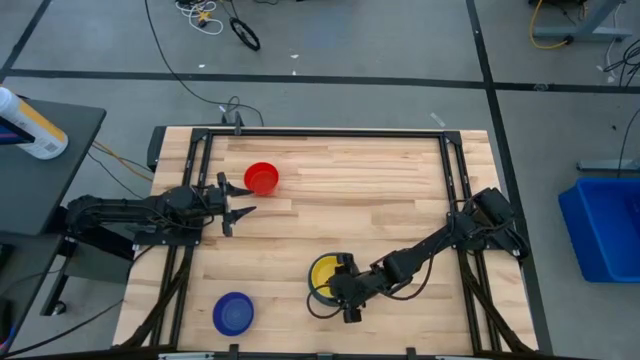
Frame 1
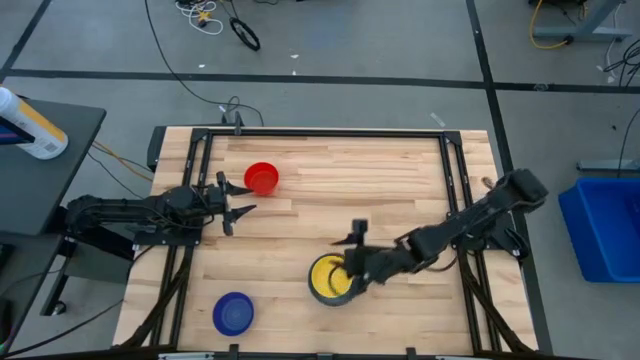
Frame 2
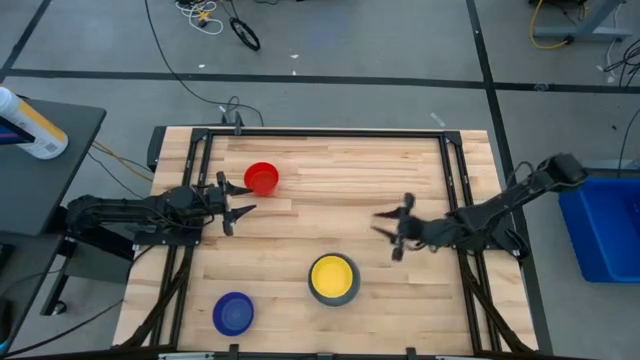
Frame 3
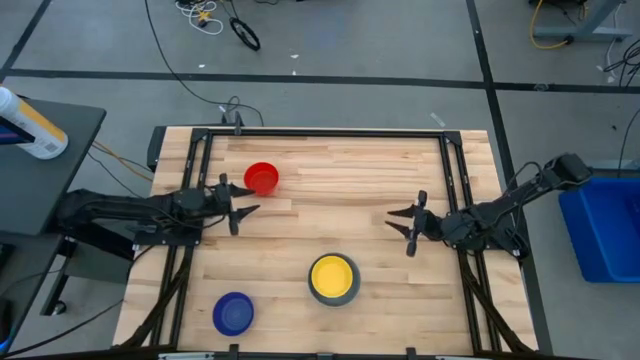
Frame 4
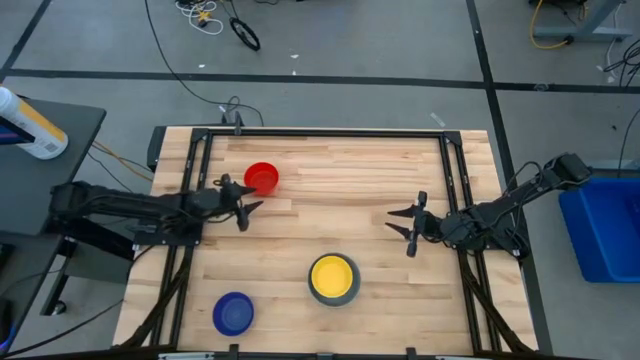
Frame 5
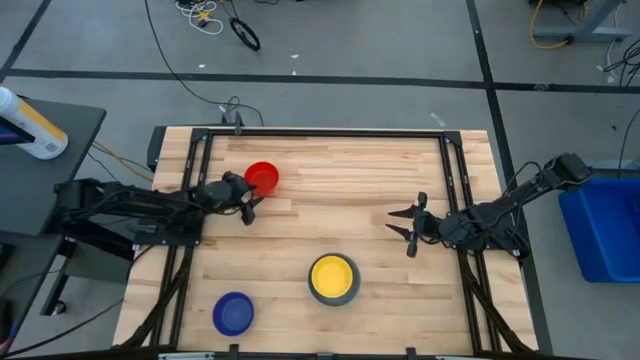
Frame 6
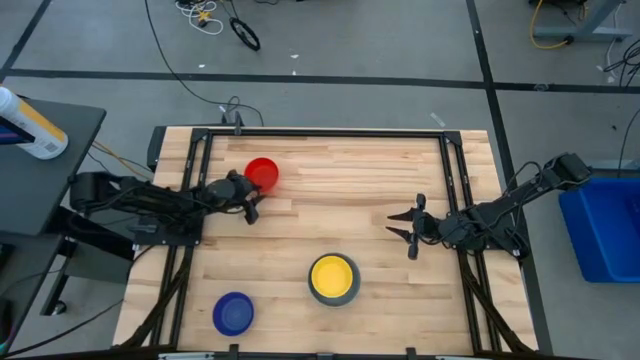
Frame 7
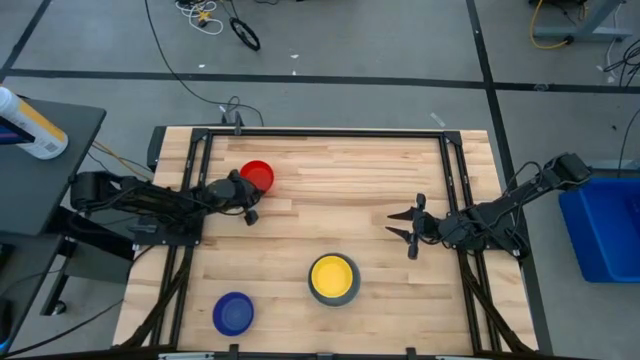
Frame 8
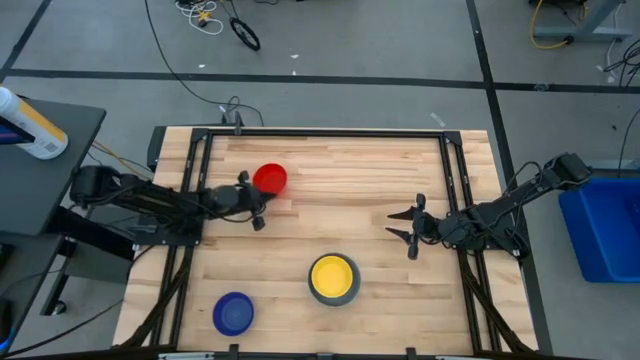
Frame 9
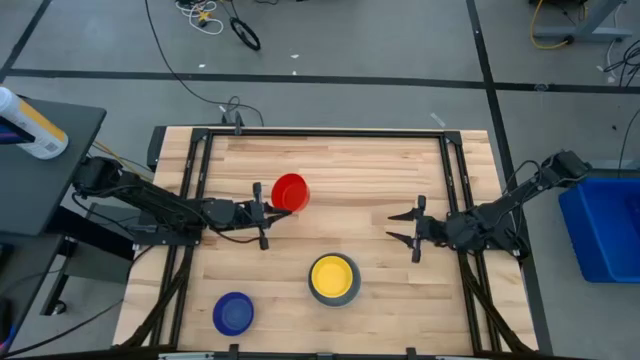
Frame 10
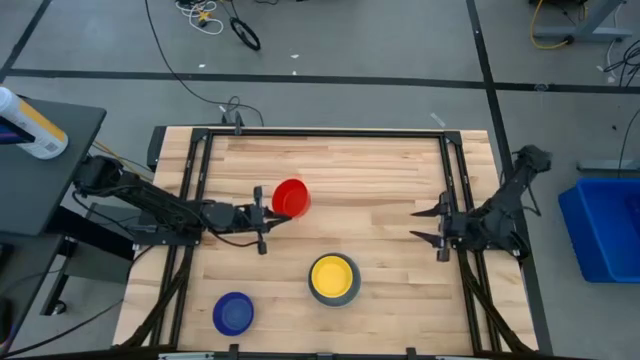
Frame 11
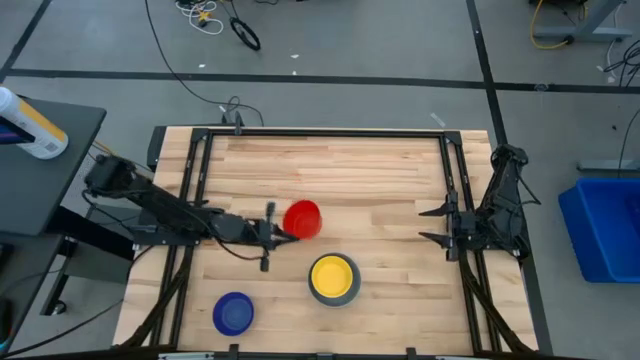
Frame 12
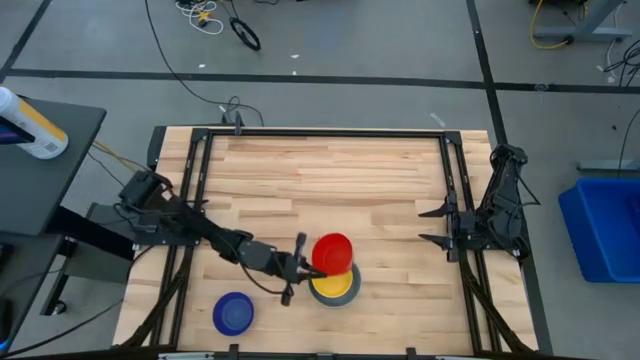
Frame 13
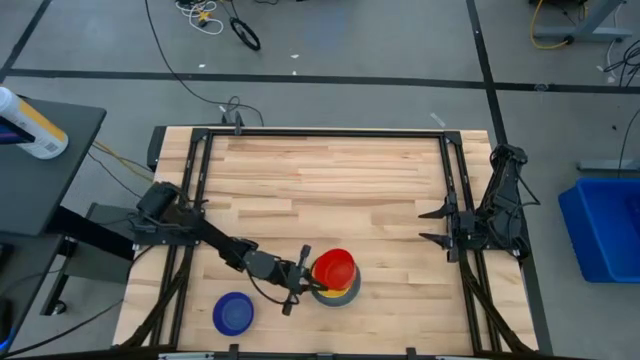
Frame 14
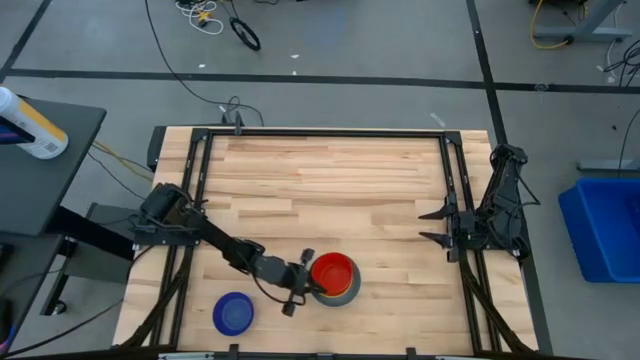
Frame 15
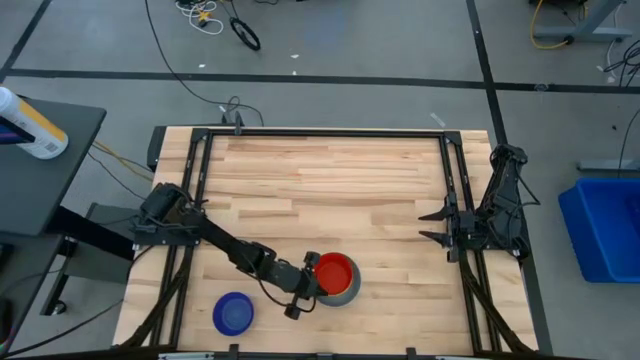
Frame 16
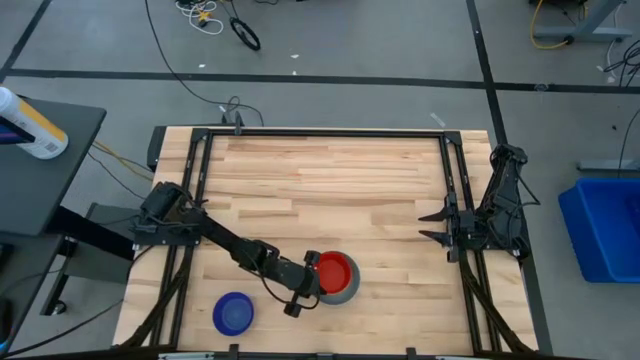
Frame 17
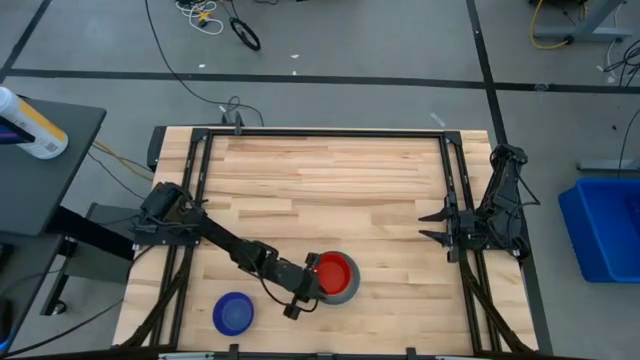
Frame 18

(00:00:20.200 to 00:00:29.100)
Stack the red bowl on top of the yellow bowl

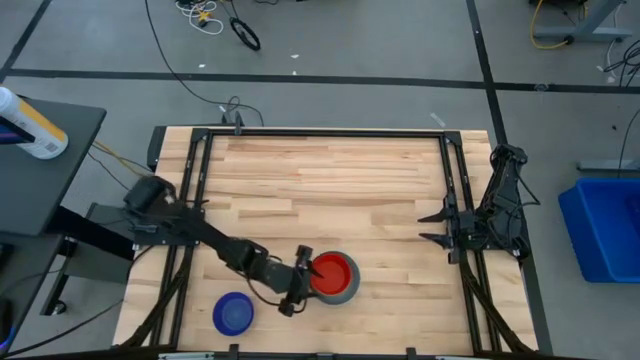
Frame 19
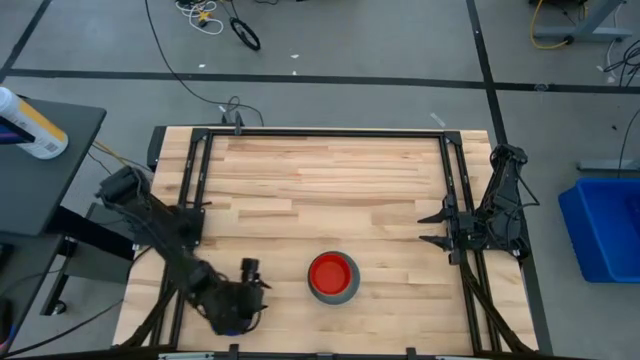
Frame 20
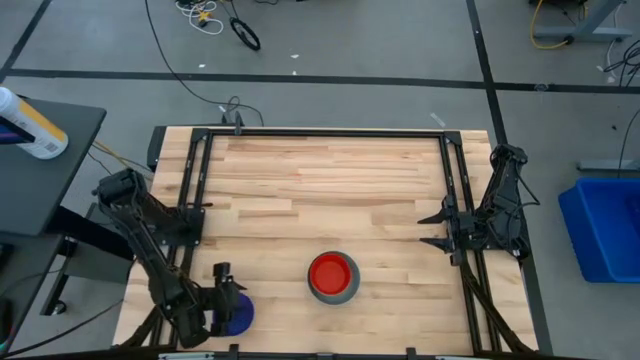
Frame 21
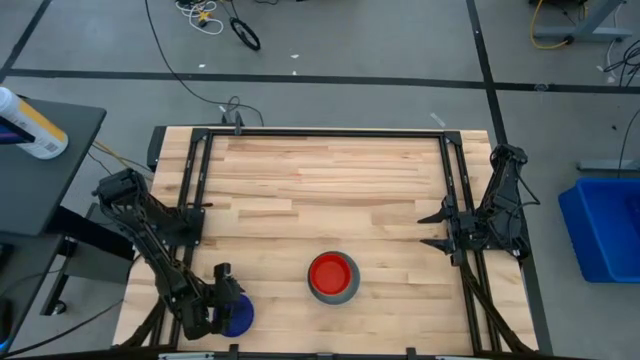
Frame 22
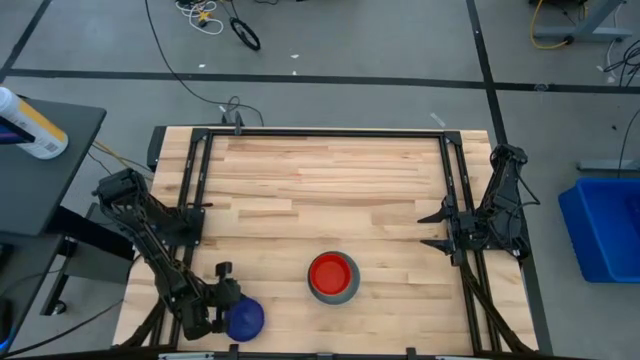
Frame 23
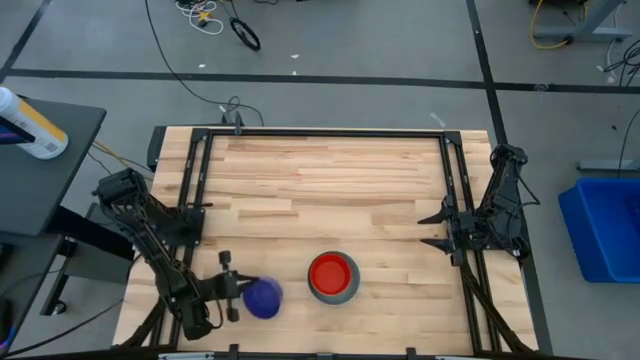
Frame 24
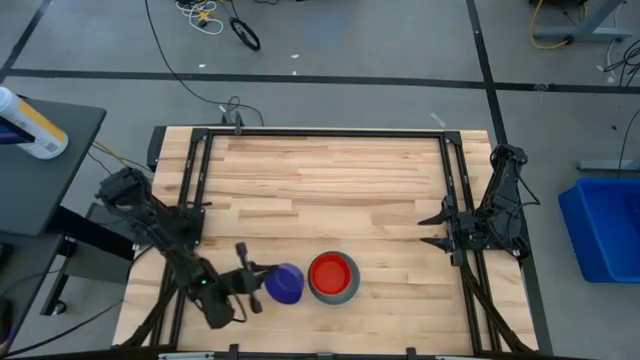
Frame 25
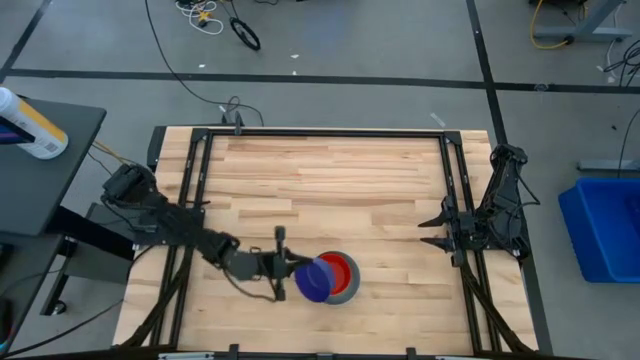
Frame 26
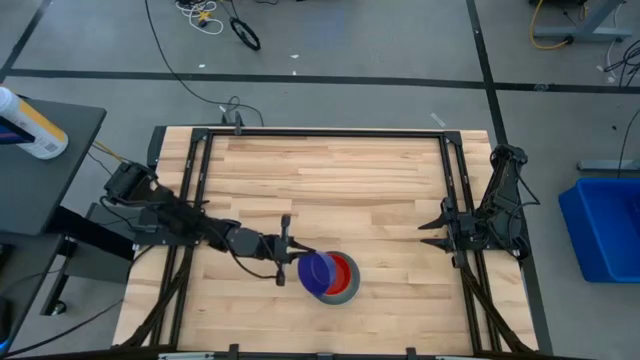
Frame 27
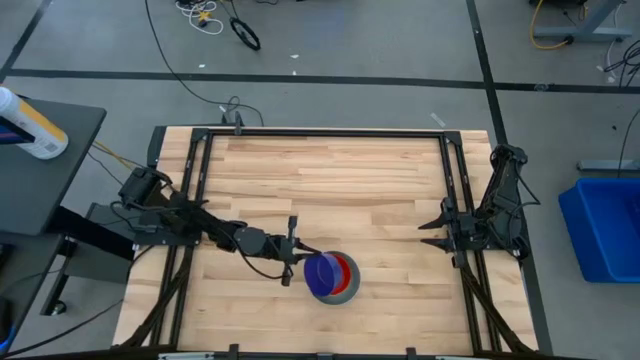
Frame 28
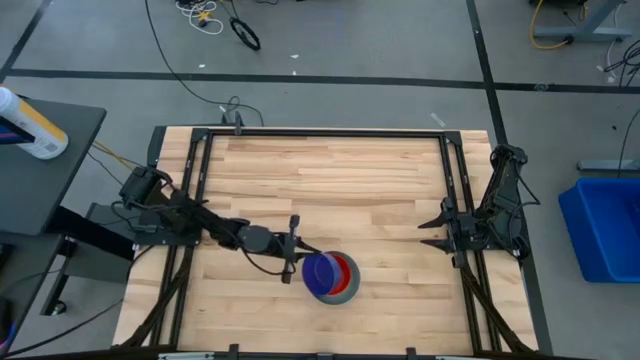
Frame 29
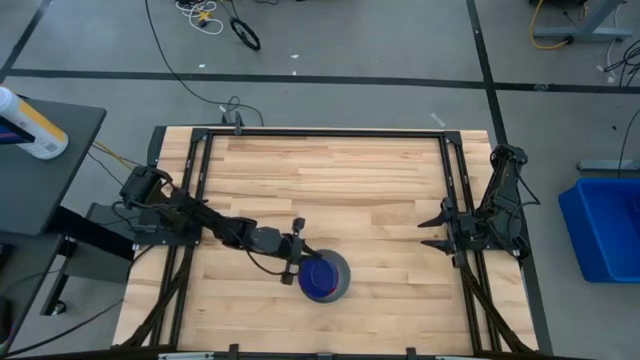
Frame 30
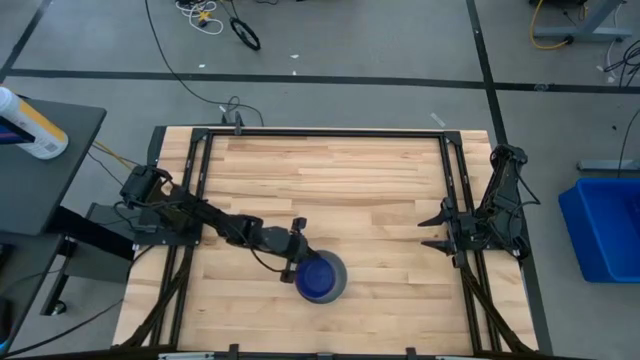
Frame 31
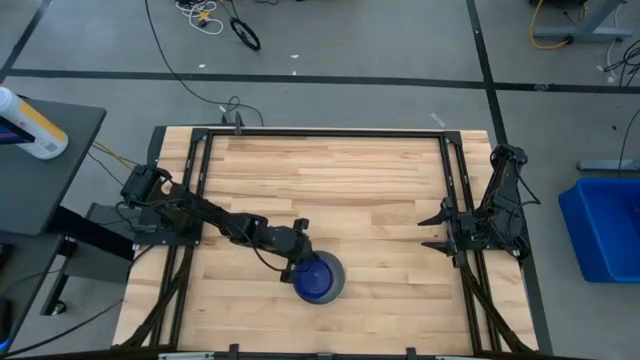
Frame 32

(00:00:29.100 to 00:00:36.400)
Stack the dark blue bowl on top of the red bowl

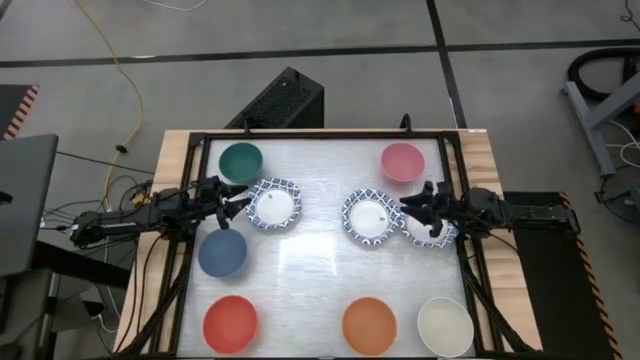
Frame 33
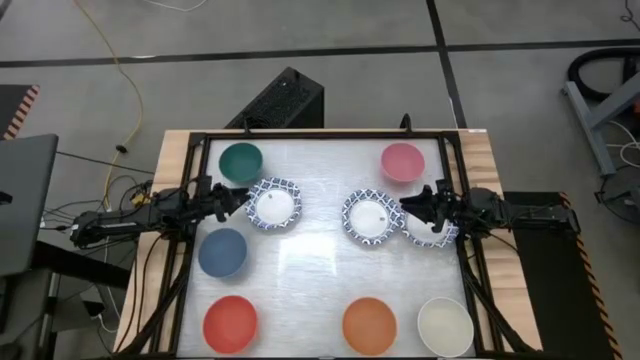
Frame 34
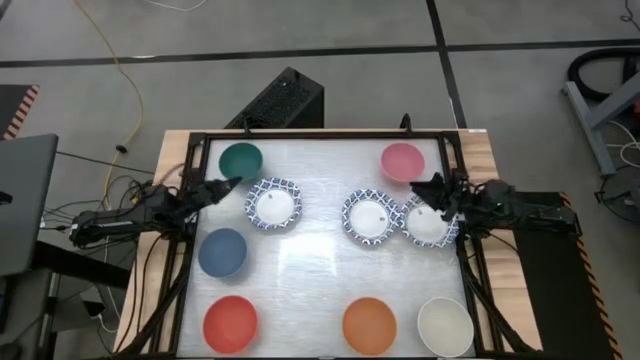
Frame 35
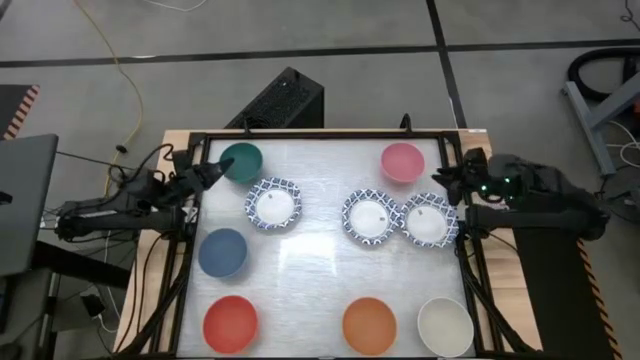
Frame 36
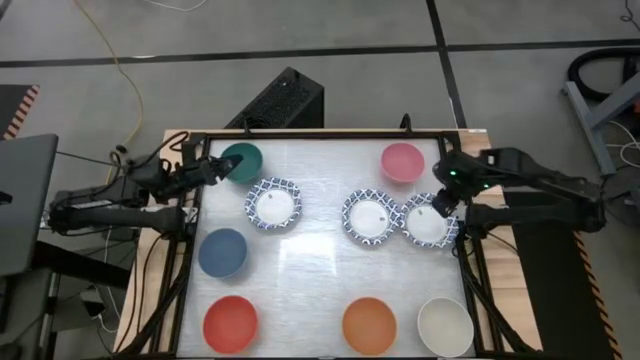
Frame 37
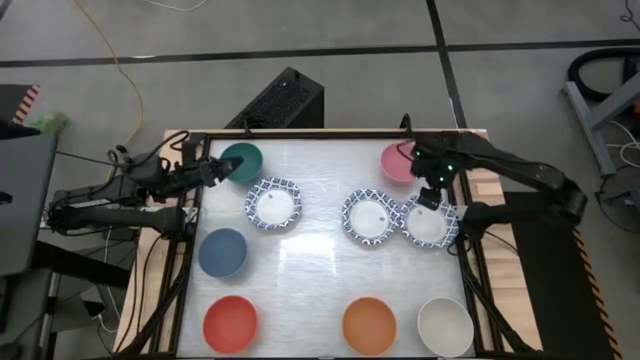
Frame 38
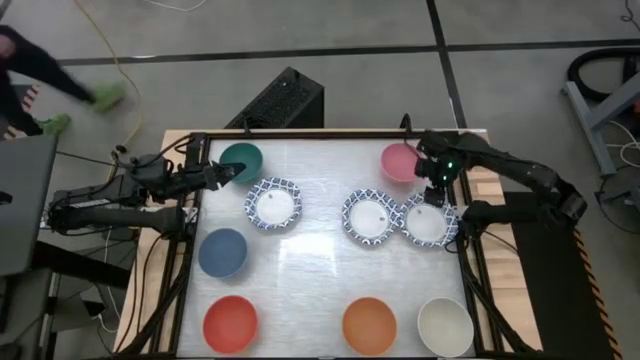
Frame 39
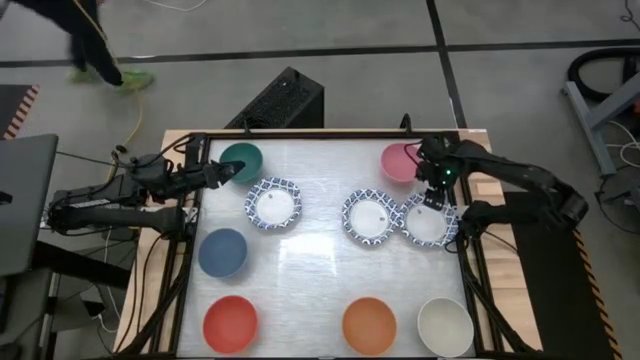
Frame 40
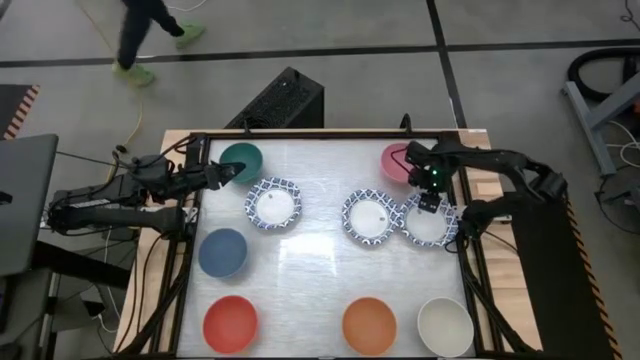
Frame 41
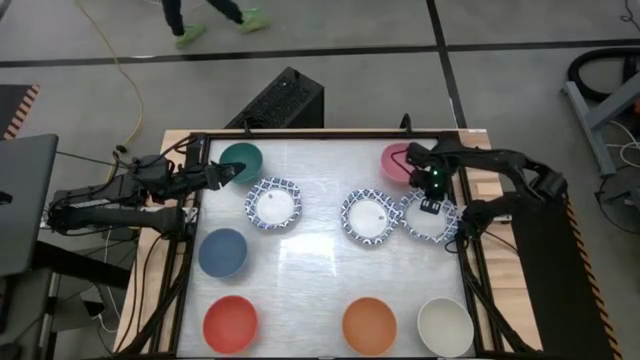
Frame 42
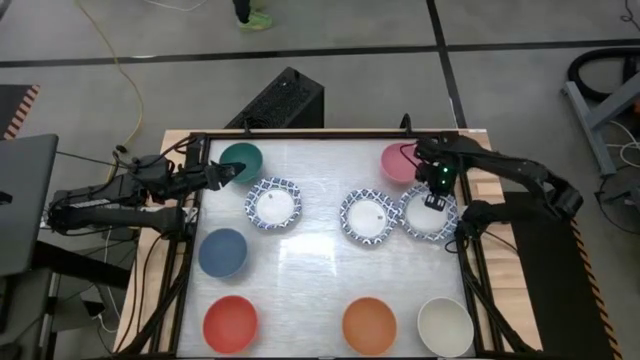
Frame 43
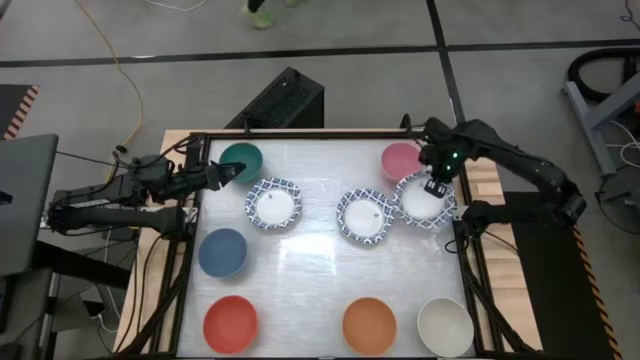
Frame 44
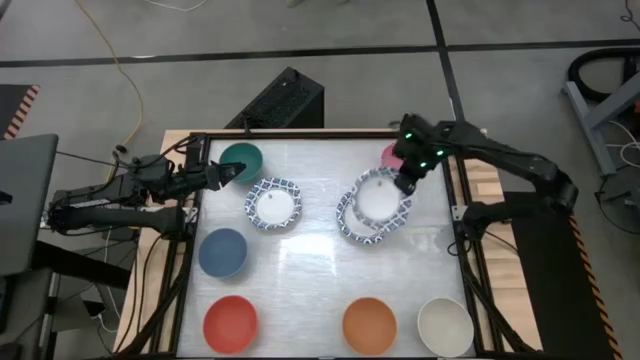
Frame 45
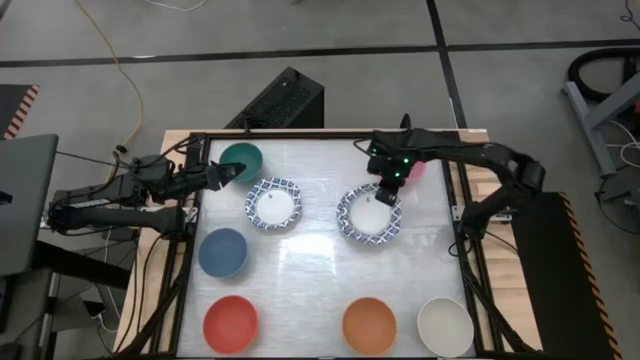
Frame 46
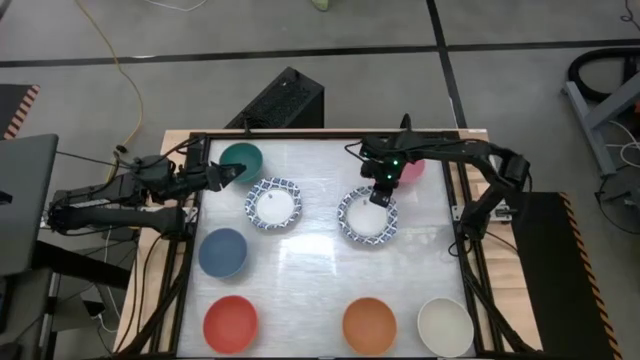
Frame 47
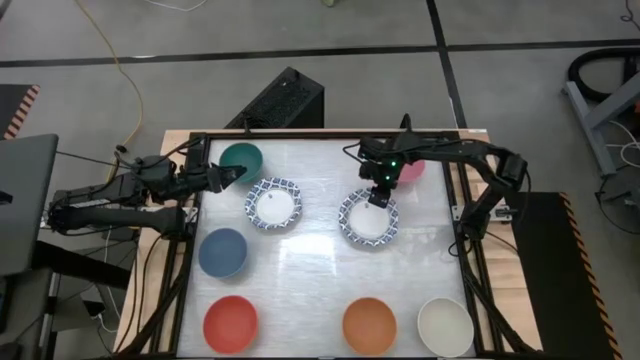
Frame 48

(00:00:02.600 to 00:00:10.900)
Stack the right white and blue bowl on top of the other middle white and blue bowl
